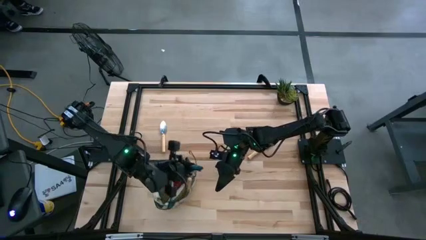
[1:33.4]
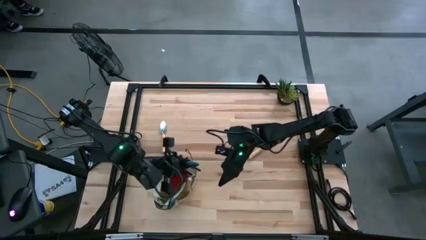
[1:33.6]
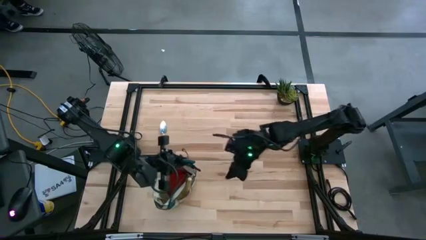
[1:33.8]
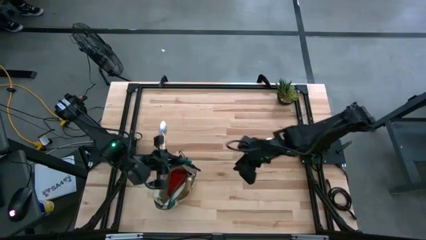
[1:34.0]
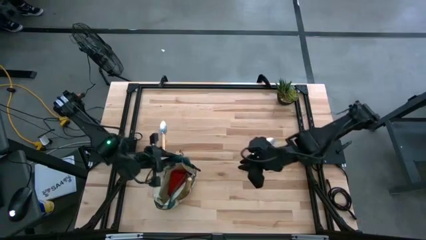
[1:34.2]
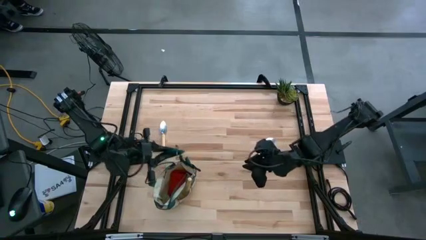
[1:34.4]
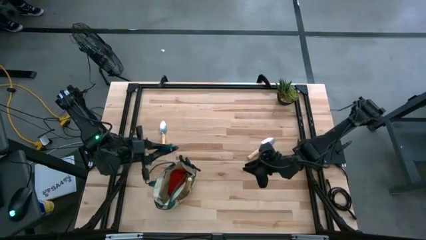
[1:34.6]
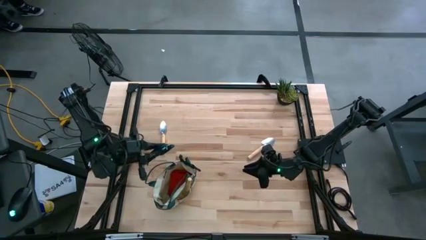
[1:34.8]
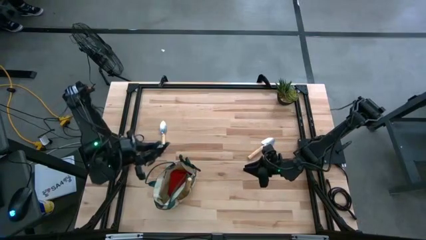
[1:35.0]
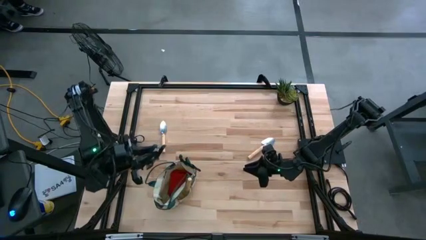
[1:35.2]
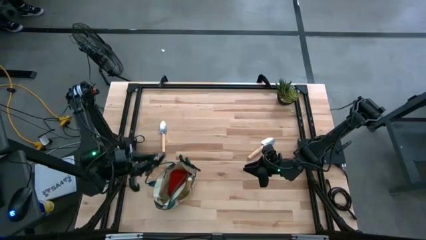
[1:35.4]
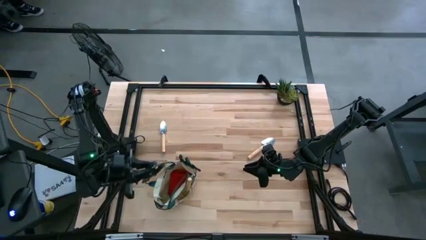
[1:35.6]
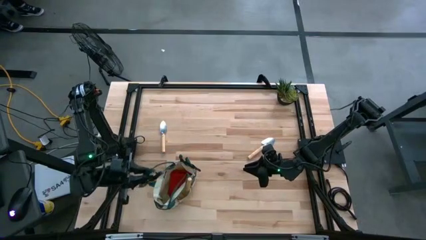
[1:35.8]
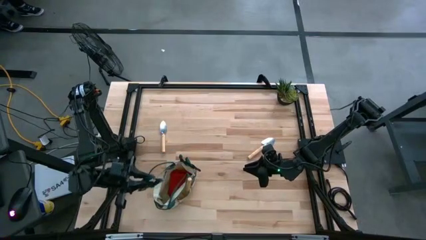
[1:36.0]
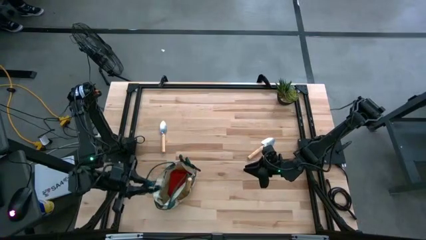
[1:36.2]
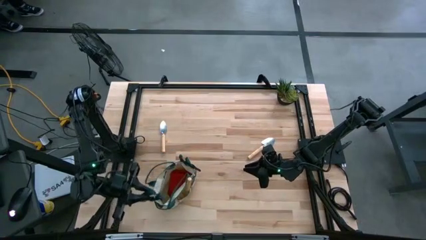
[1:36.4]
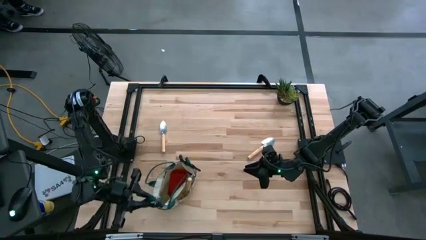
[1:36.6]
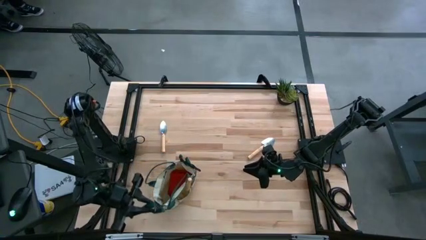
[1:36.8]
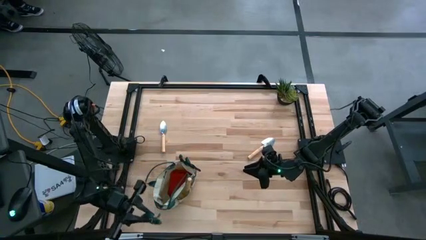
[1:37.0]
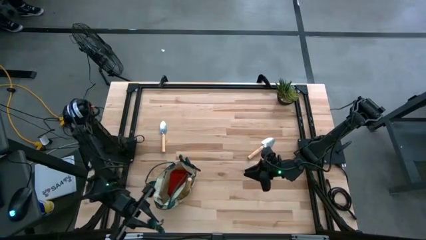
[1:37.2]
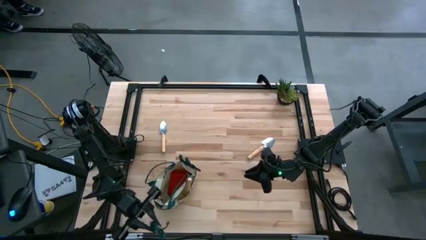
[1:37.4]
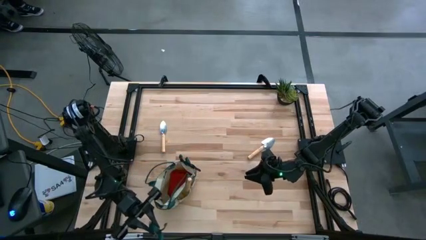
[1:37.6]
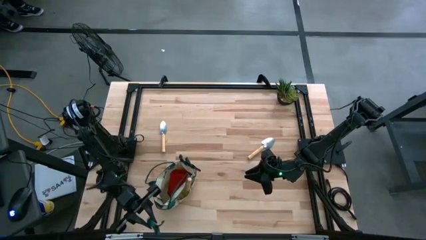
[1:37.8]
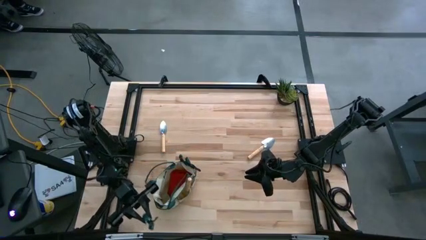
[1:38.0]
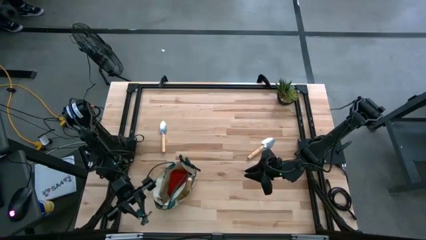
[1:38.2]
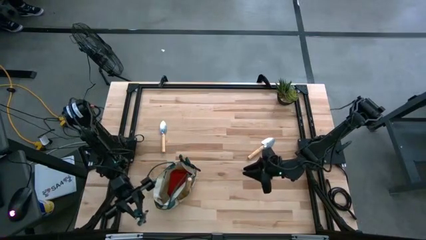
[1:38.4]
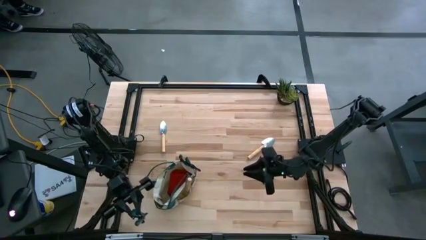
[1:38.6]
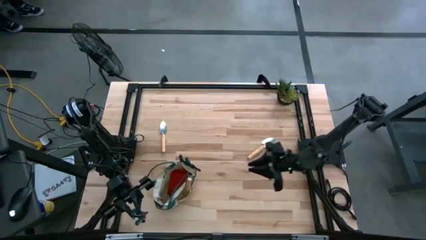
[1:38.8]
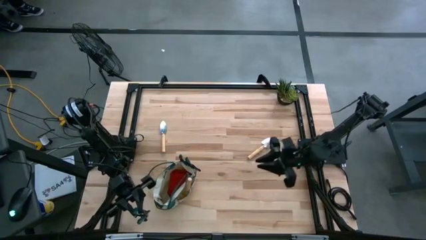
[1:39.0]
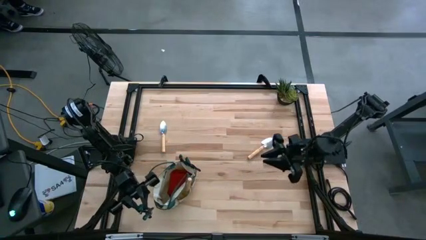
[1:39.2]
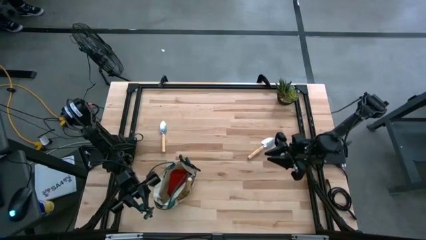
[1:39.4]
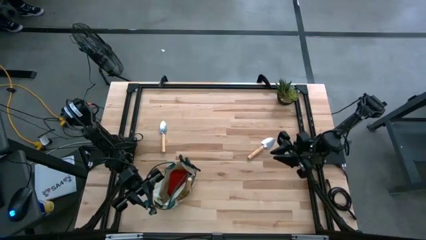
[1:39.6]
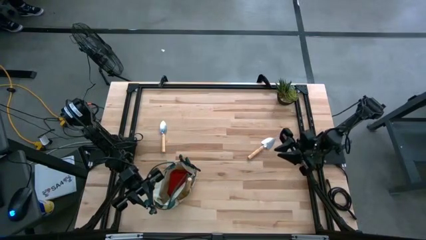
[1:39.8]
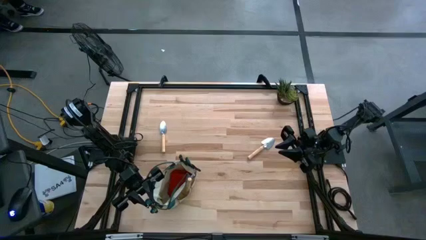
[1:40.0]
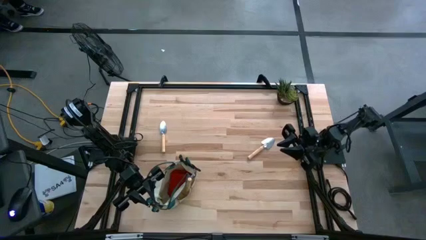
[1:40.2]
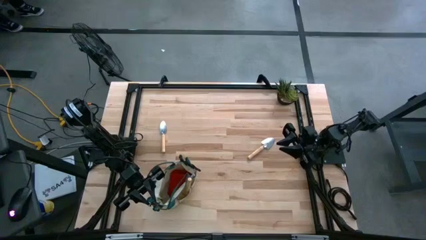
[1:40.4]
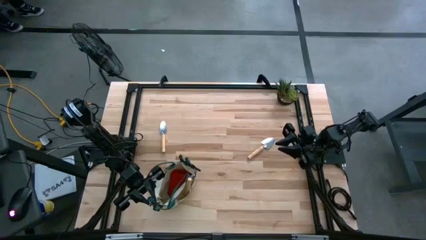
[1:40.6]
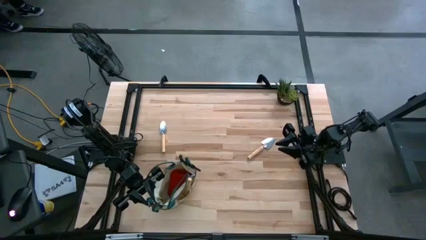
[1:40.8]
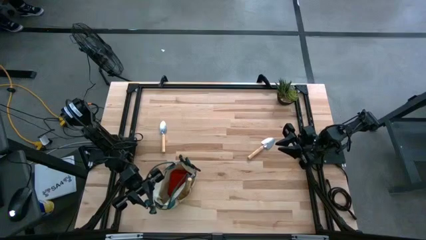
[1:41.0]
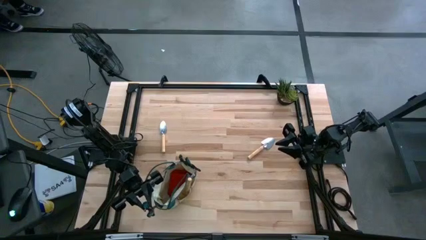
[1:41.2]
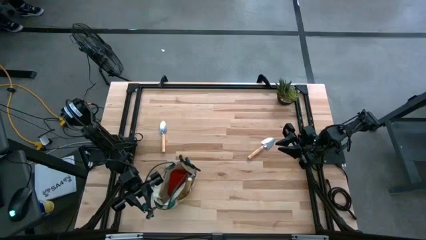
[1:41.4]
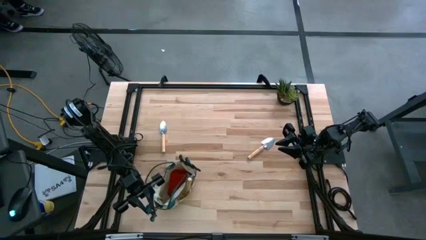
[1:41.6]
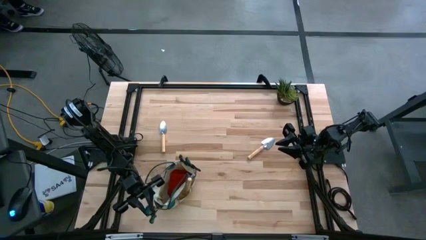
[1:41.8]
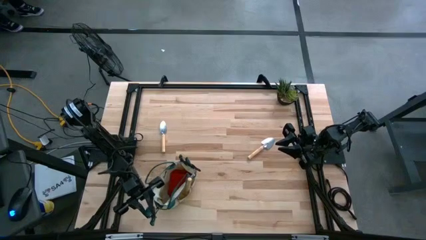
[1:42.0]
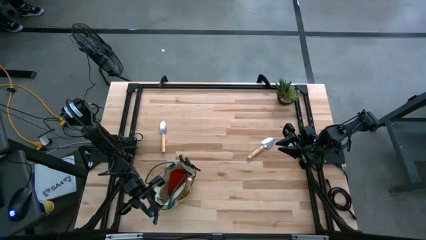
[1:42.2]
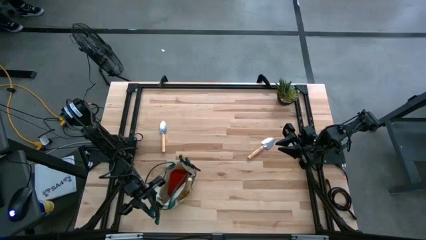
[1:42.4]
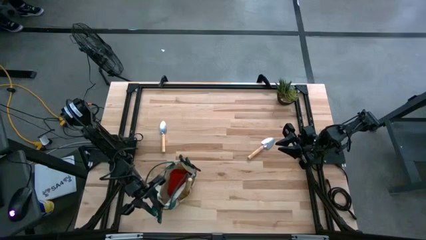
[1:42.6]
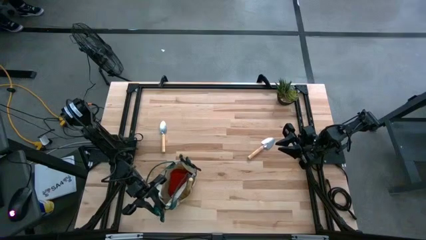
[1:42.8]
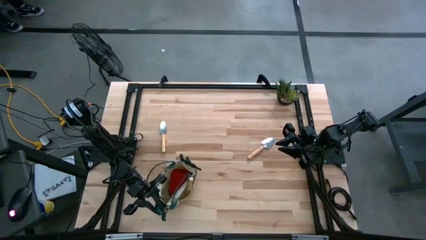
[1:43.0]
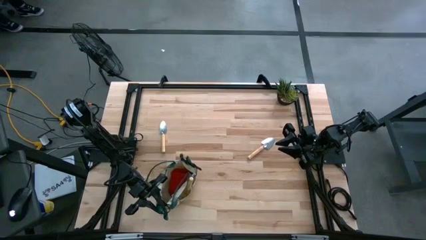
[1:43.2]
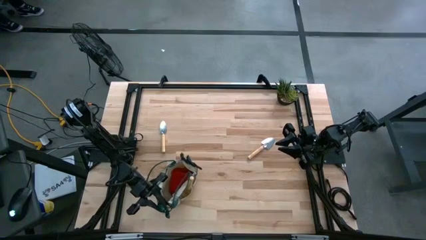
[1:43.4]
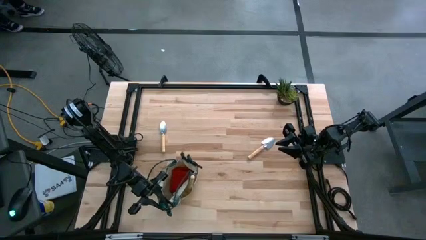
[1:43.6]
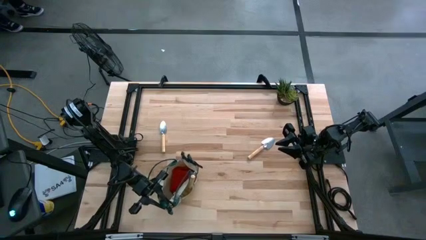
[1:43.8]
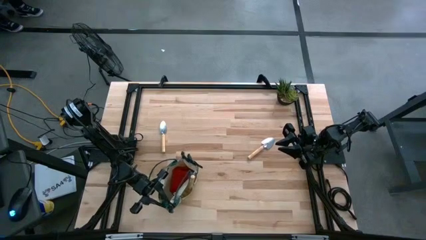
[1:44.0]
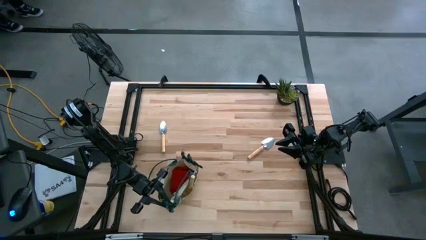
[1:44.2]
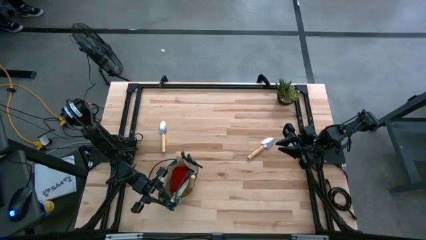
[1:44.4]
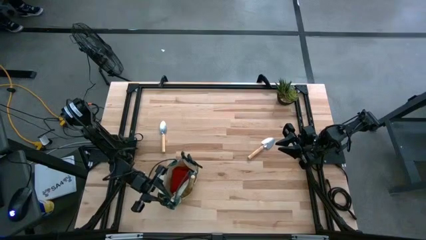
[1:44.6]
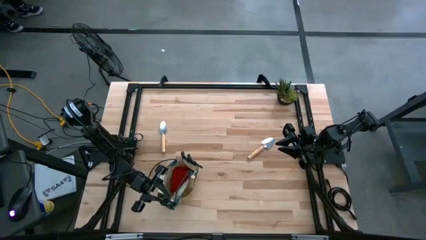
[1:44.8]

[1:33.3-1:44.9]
Task: Pick & Place Garden tools in Gardening bag
Put the shear scissor into the gardening bag

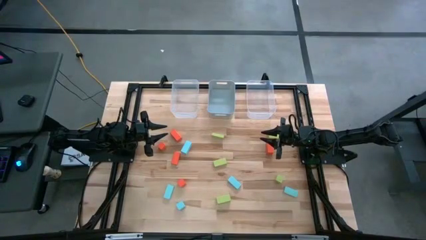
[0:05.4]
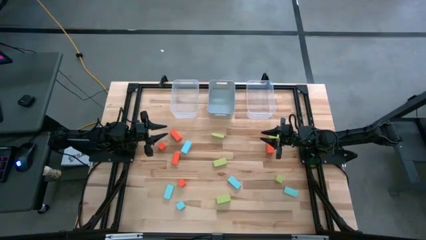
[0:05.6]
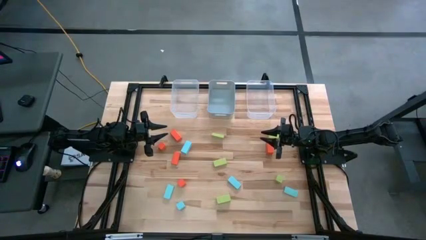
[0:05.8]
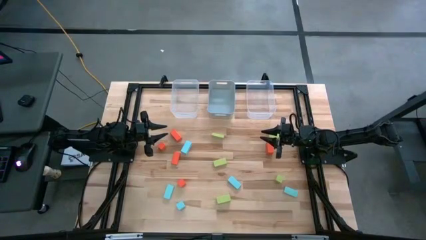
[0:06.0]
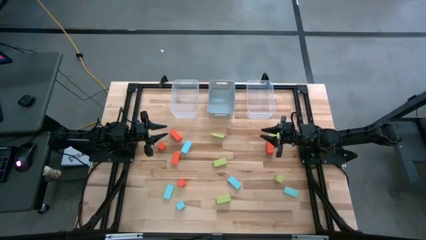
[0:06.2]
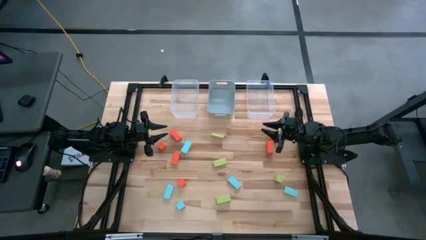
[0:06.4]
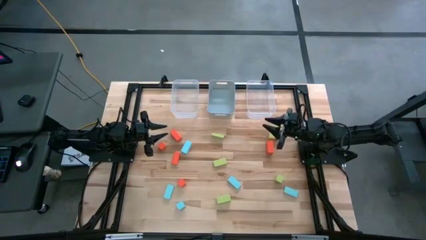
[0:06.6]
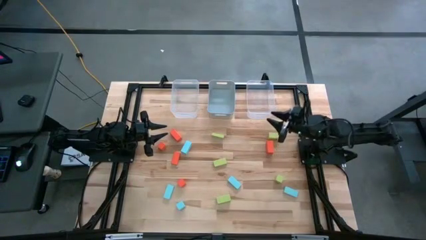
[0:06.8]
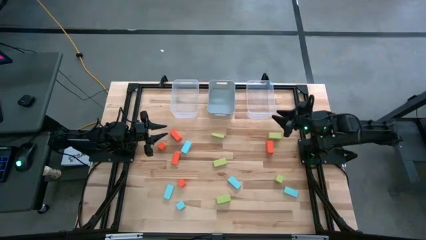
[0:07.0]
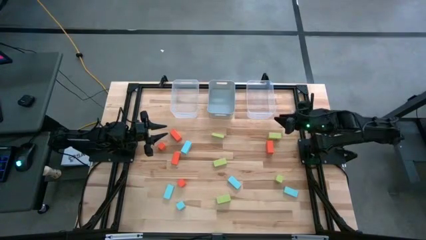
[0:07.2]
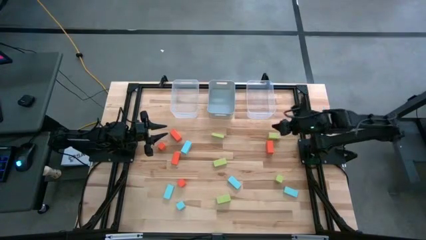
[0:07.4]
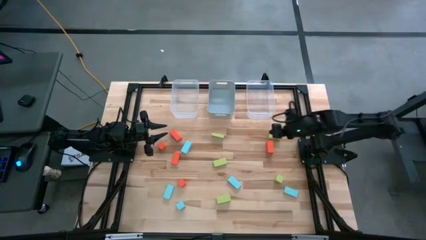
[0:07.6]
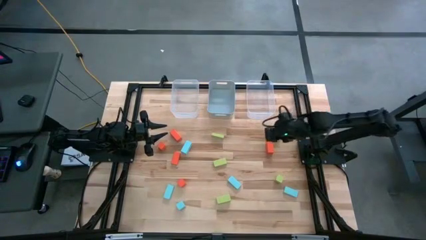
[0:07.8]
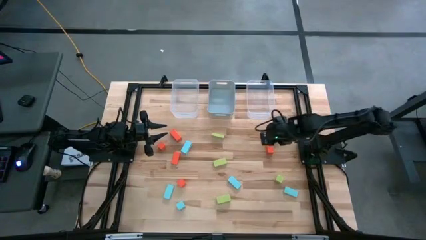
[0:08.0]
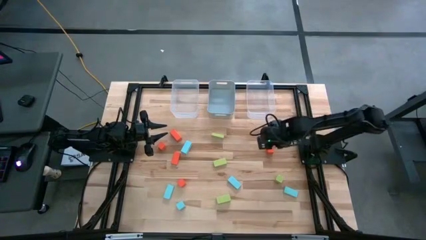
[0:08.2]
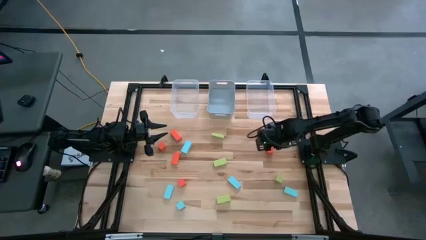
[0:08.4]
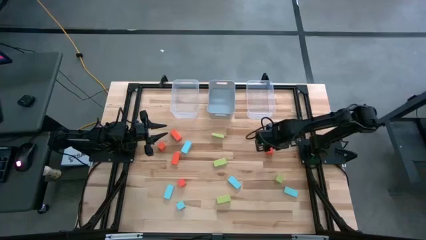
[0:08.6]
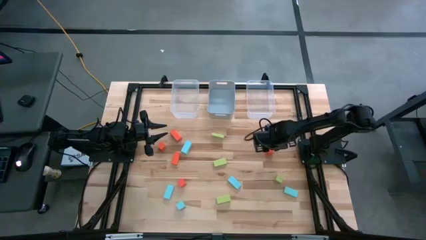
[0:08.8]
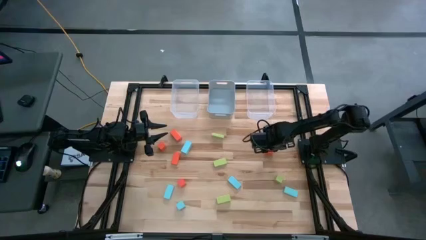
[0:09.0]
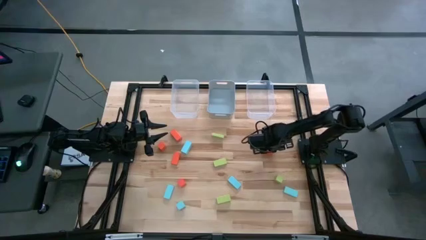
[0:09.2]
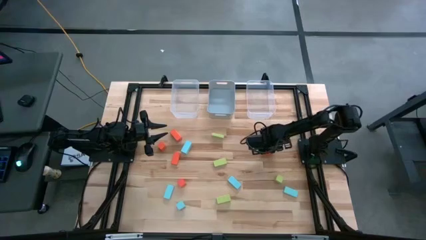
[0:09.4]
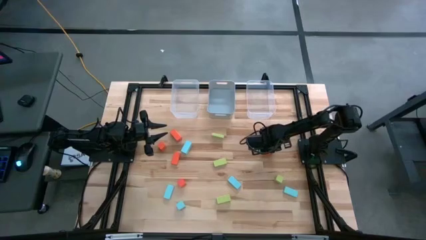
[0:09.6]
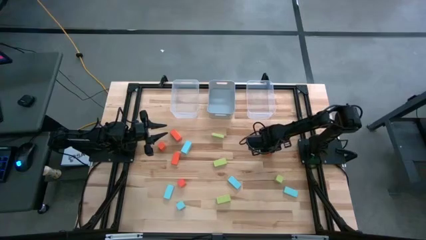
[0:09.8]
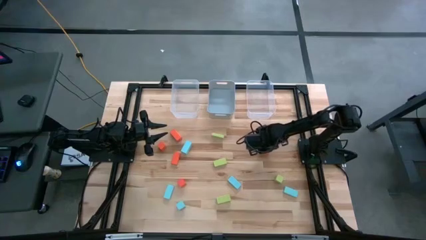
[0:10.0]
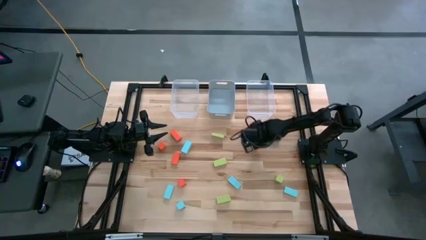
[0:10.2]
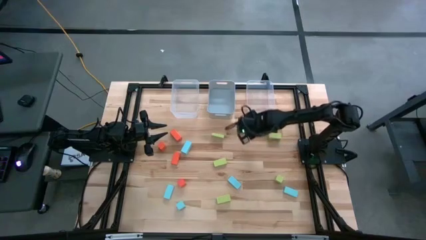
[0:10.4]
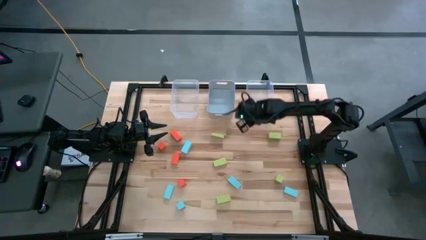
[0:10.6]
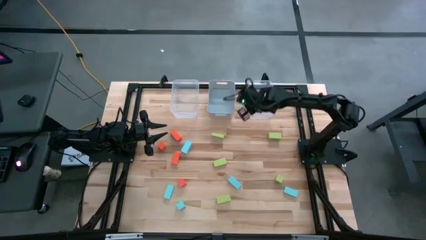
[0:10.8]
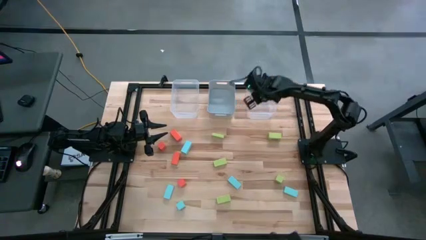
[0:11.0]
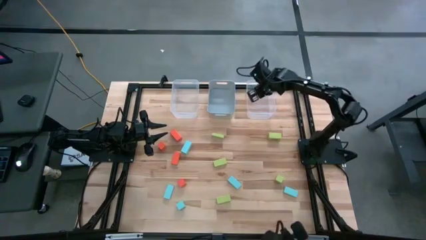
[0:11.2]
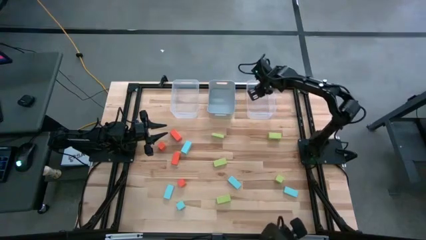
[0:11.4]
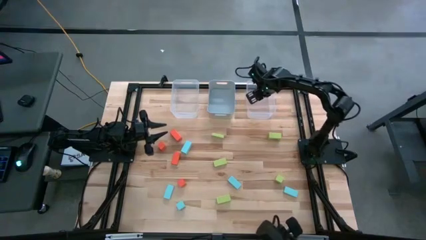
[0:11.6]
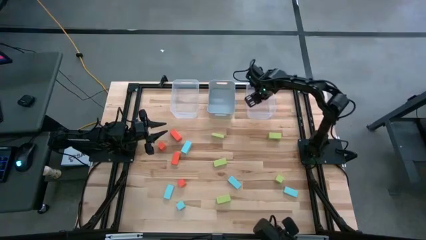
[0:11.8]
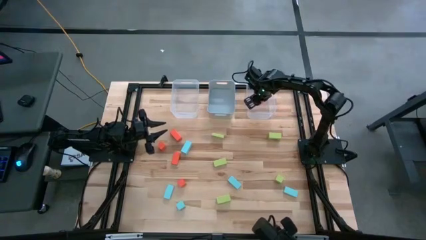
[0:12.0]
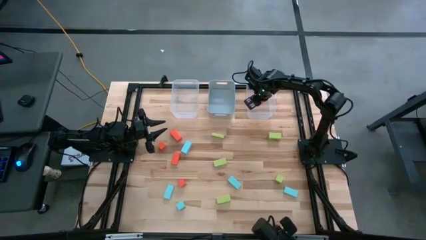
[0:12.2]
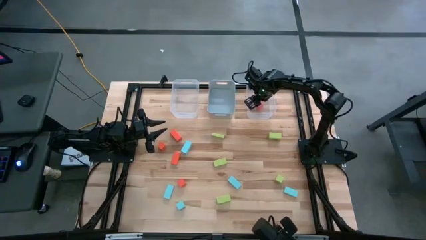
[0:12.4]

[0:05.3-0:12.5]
Task: Sort & place blocks by color
Put the orange block into the right transparent bin
